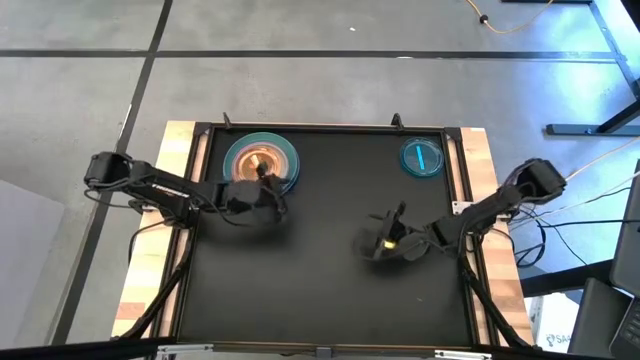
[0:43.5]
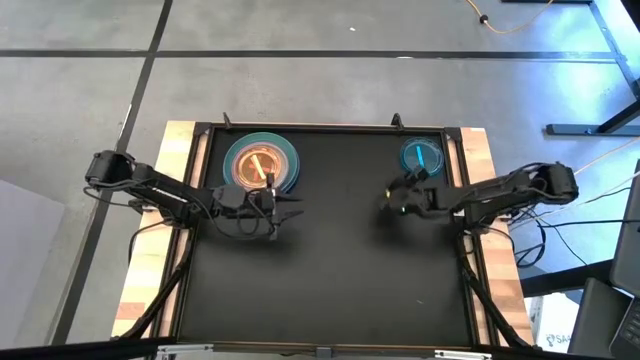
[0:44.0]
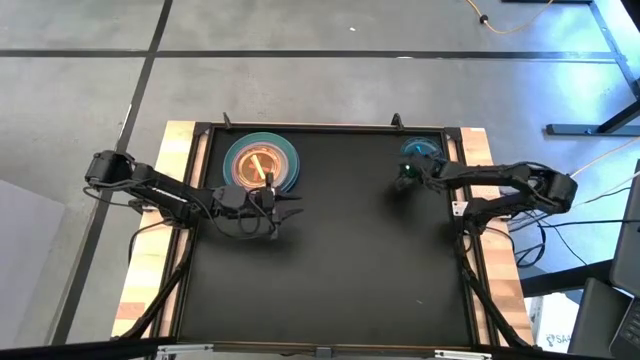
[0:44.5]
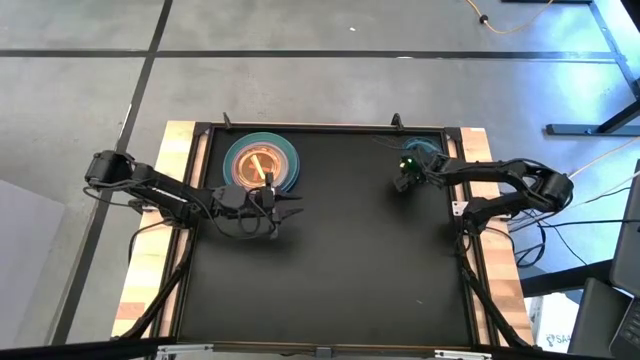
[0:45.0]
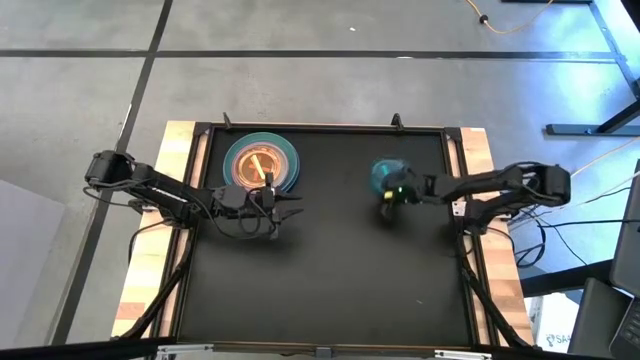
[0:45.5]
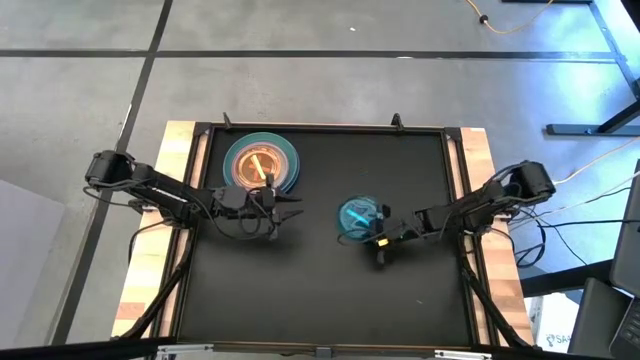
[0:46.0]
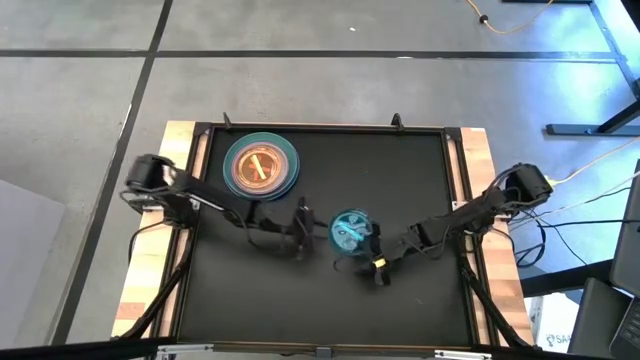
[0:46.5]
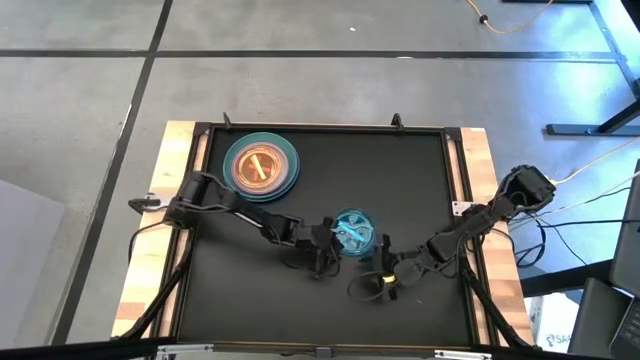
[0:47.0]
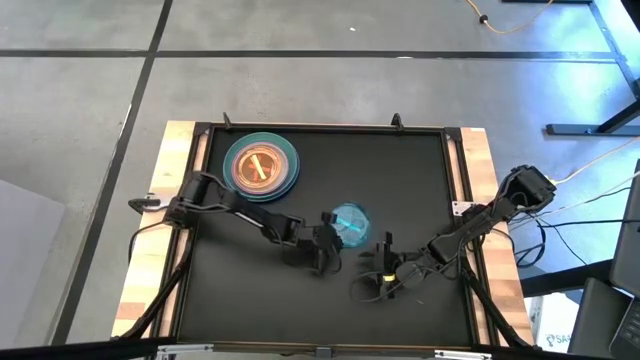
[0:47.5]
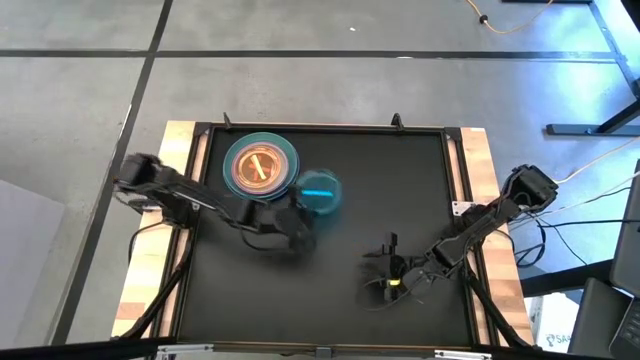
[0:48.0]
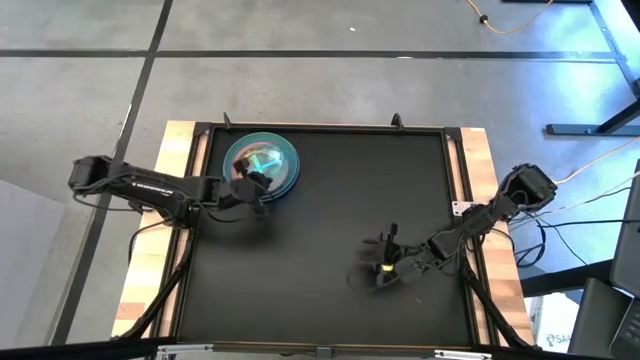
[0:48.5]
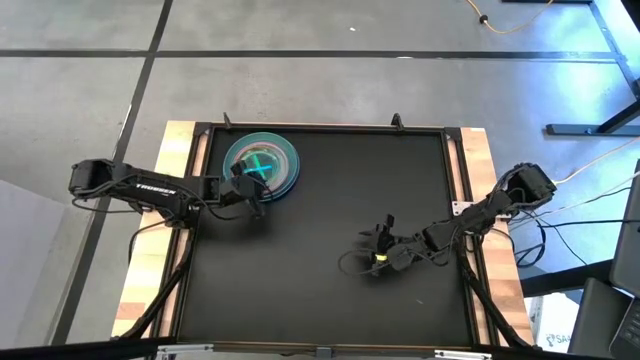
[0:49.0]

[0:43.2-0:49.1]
Task: Stack plastic plates
Stack the blue transparent plate on top of the green transparent plate

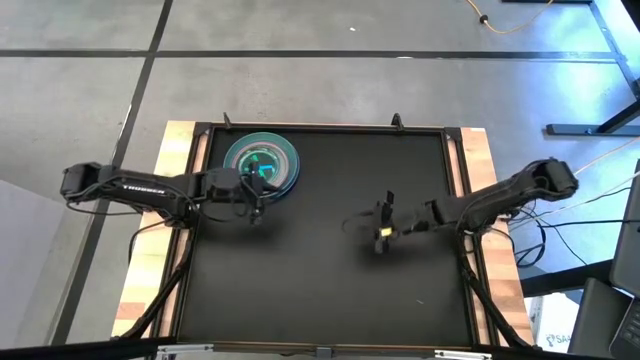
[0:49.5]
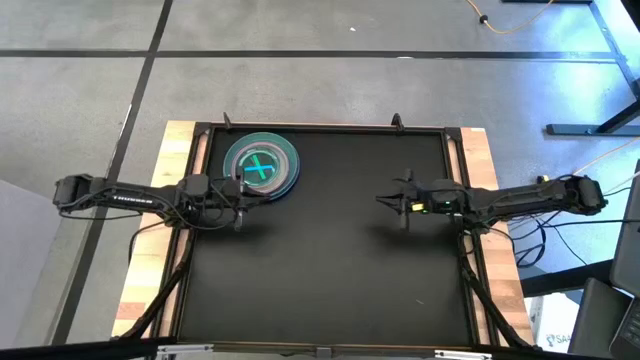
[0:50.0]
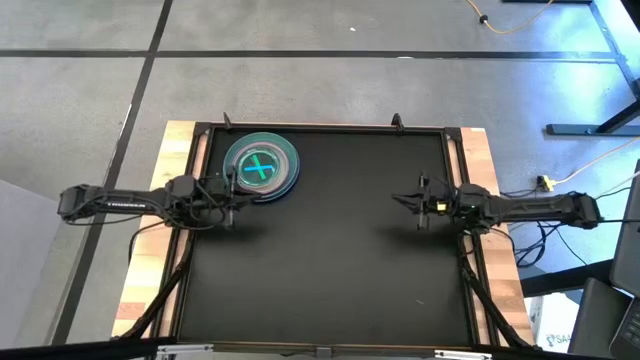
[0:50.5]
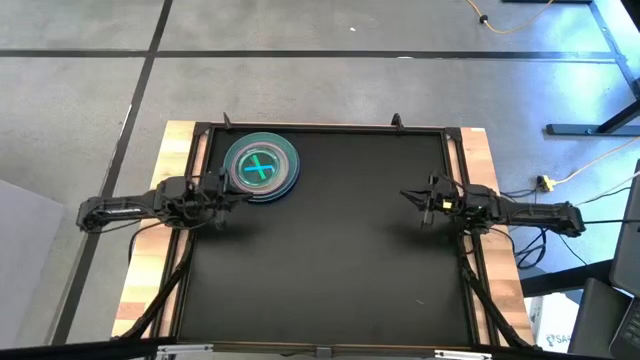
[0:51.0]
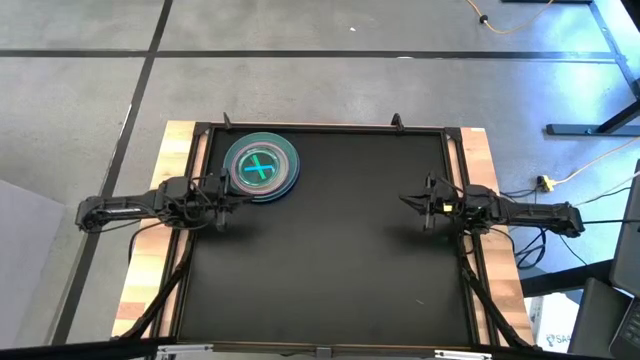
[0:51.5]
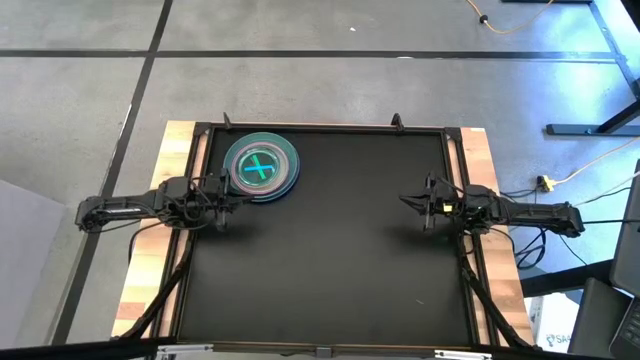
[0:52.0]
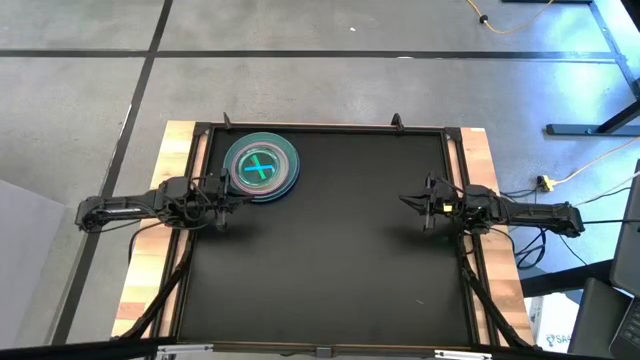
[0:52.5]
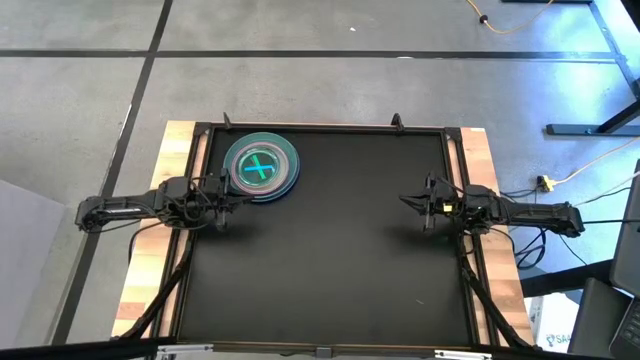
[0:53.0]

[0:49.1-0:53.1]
Return to Home Position

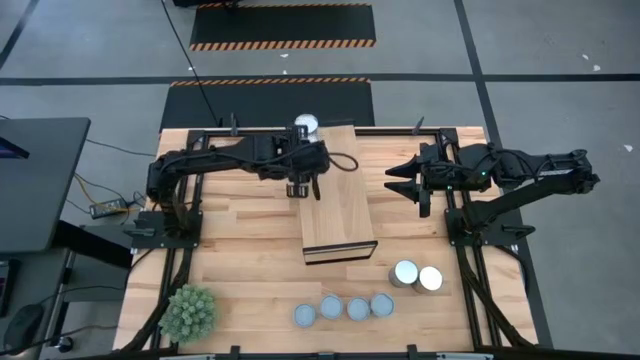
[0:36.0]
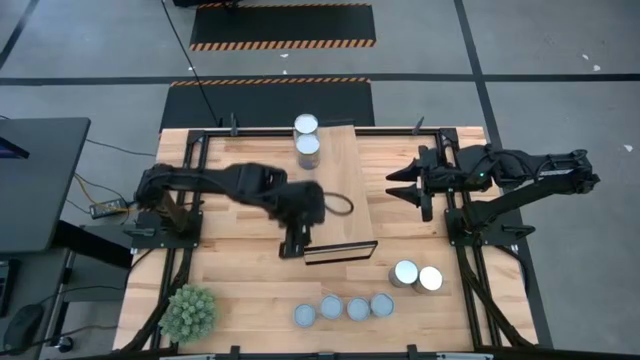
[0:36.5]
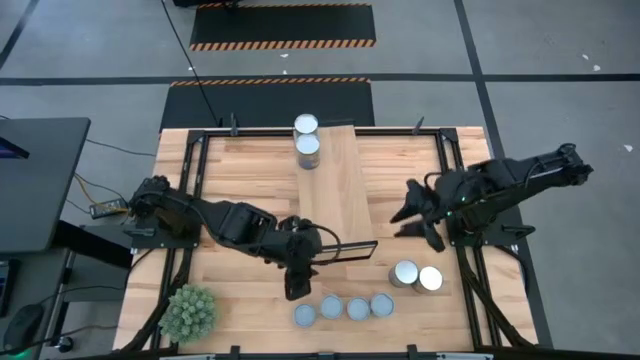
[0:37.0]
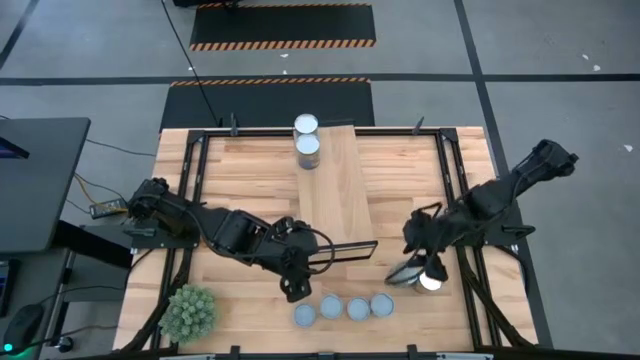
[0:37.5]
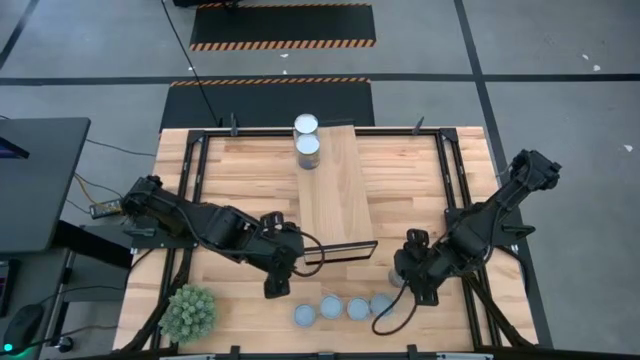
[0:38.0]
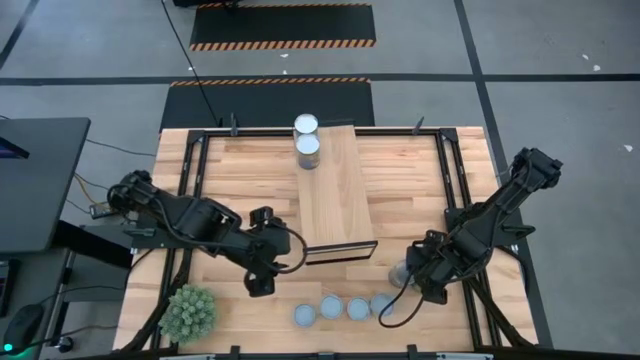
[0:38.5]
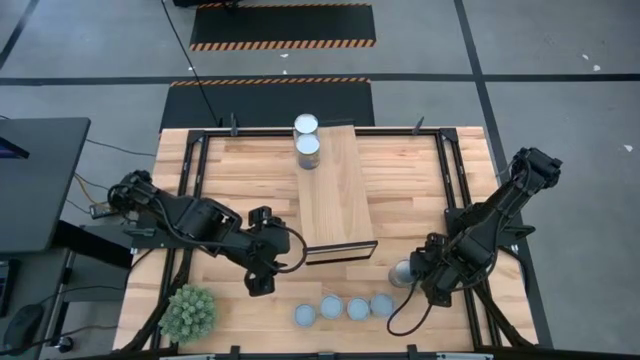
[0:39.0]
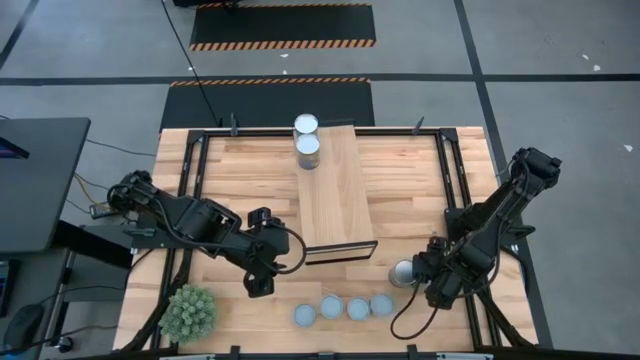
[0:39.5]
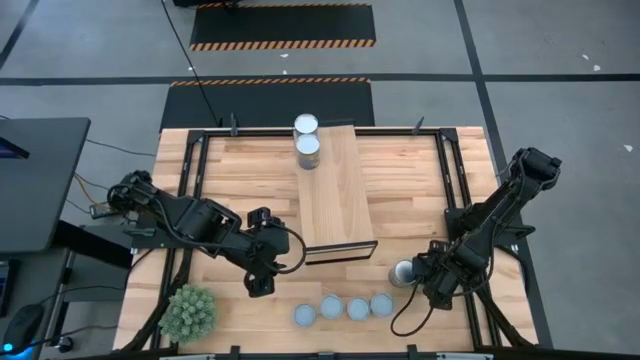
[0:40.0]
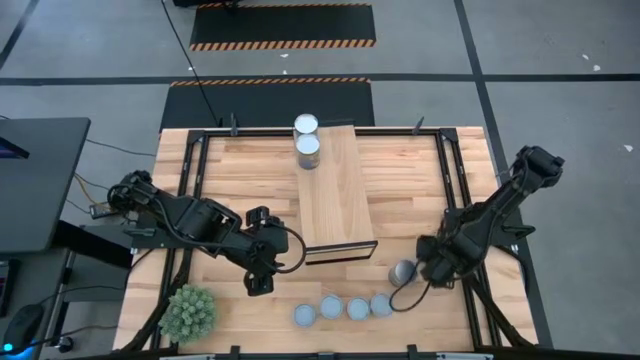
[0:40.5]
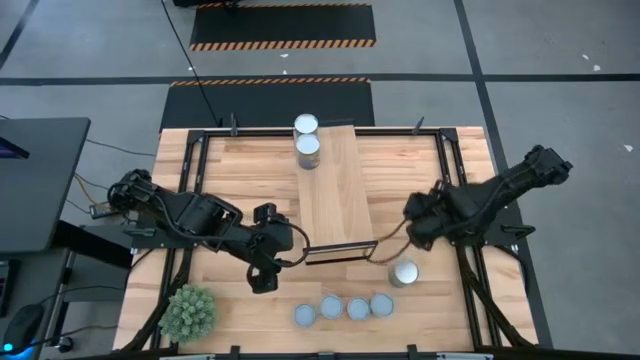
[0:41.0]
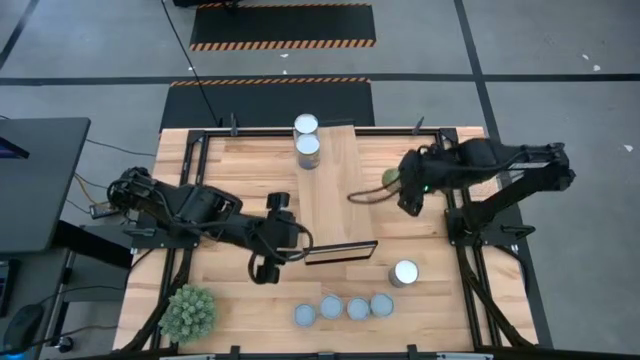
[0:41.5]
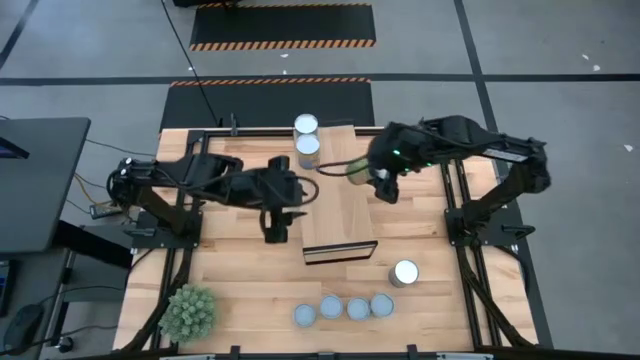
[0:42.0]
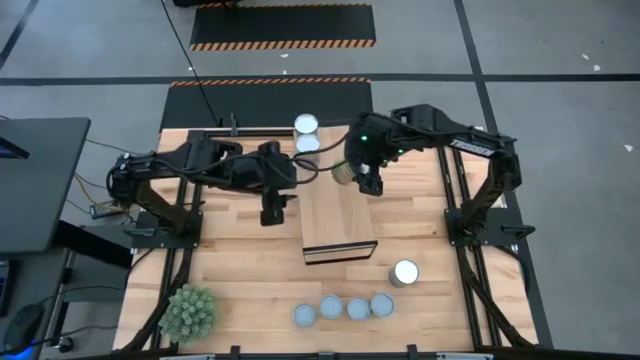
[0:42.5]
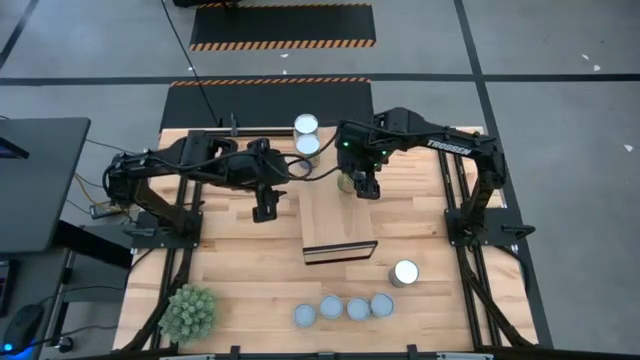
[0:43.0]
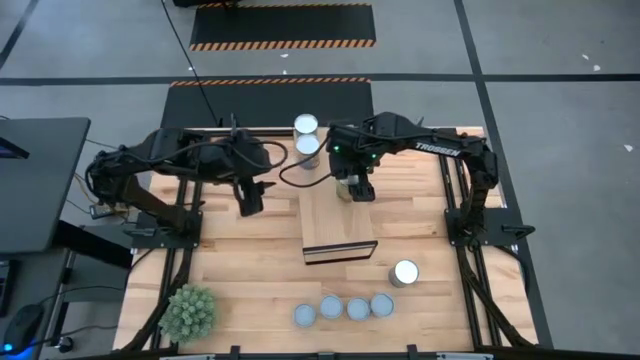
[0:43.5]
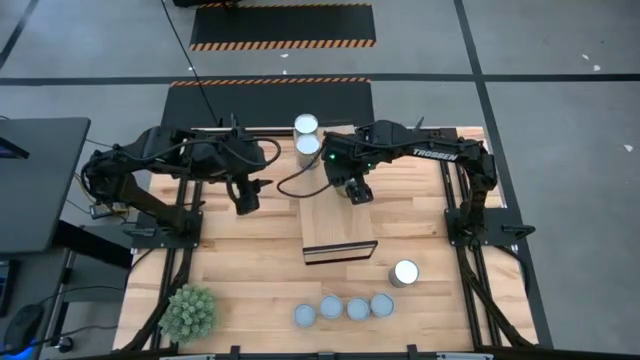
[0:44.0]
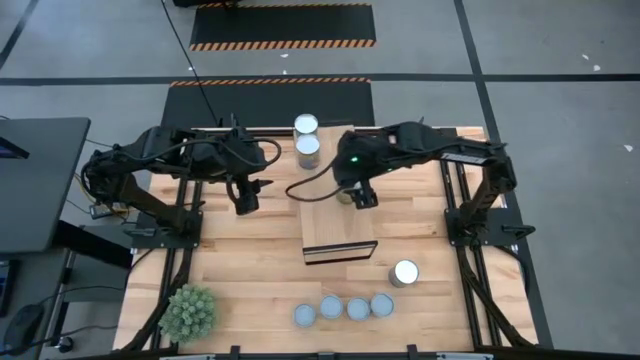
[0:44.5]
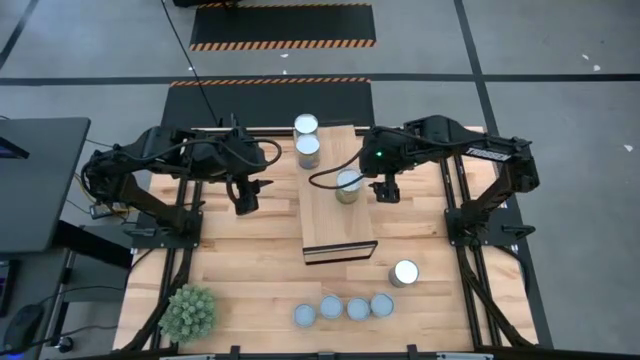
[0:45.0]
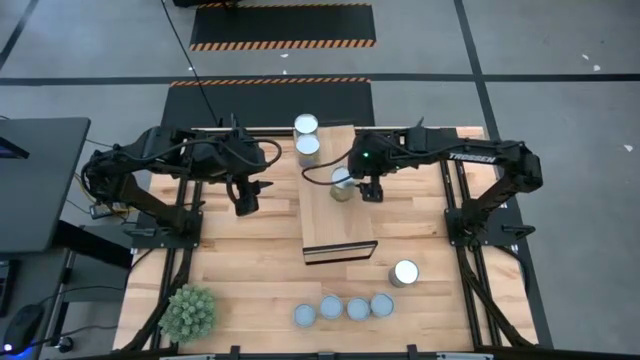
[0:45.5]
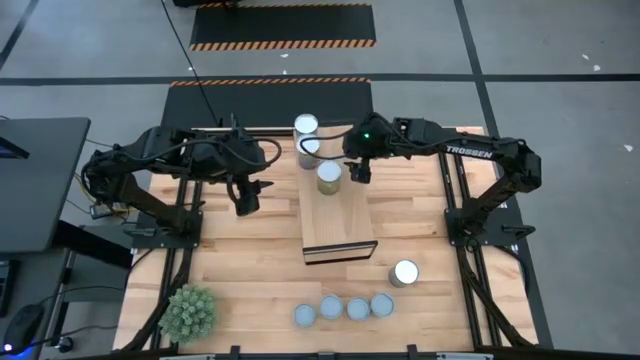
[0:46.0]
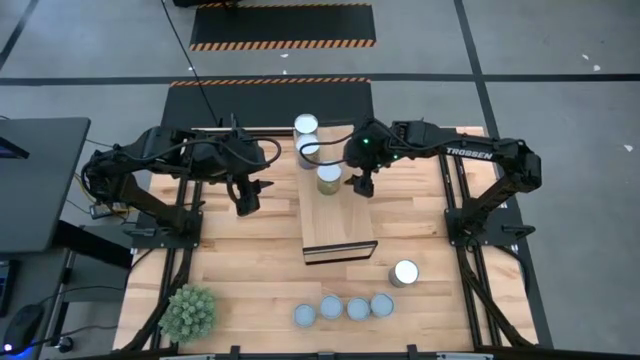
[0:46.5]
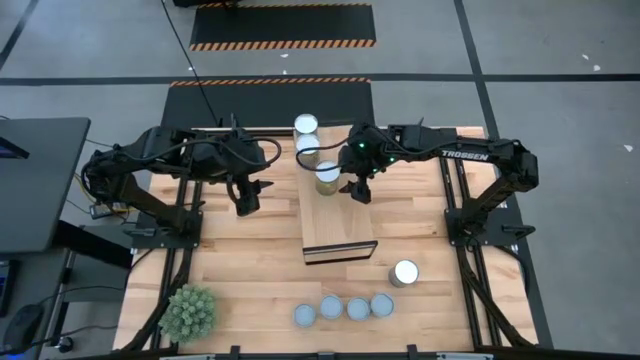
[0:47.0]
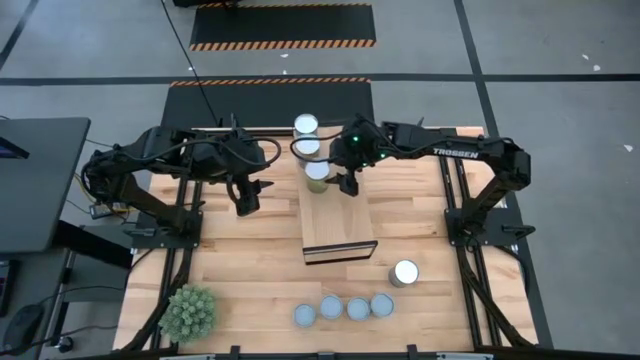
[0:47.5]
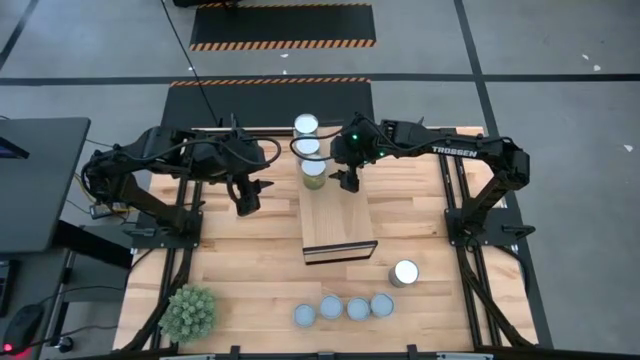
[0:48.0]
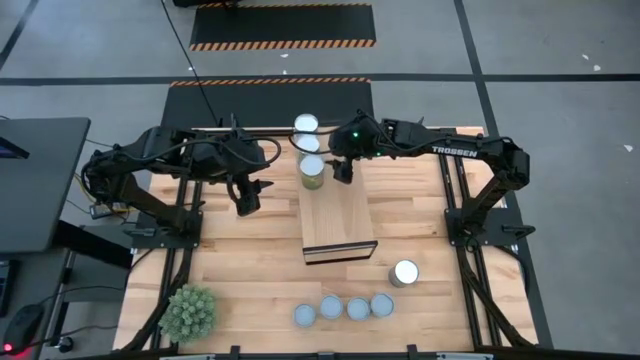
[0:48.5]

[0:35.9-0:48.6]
Task: Pick and place cans onto a shelf
Put the canned oranges on the shelf
